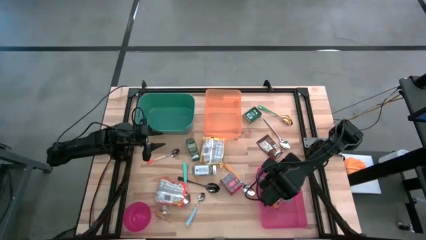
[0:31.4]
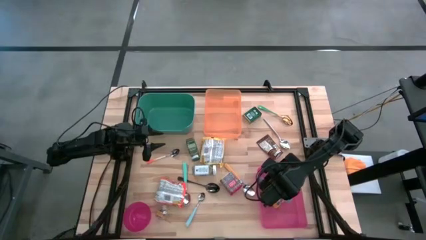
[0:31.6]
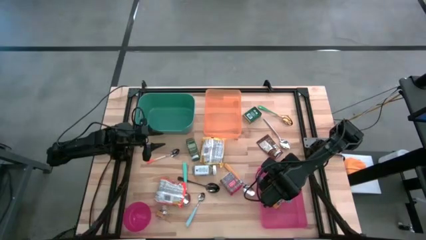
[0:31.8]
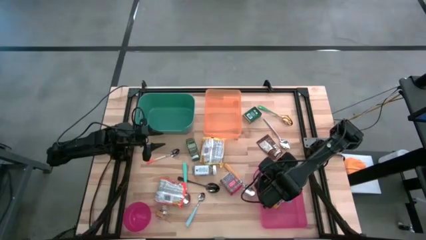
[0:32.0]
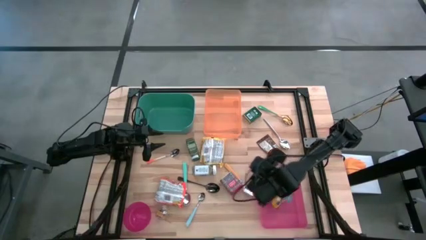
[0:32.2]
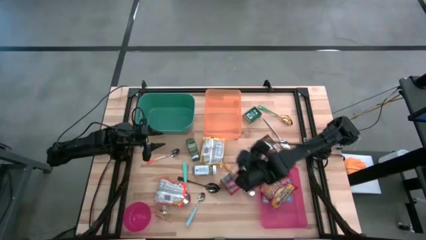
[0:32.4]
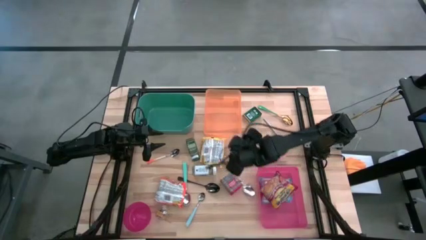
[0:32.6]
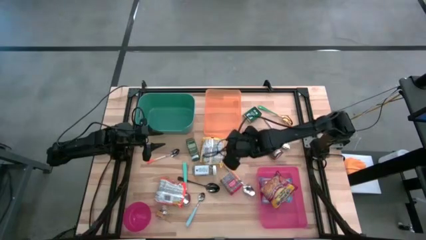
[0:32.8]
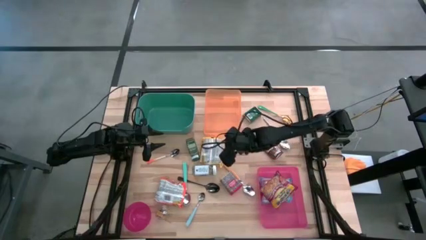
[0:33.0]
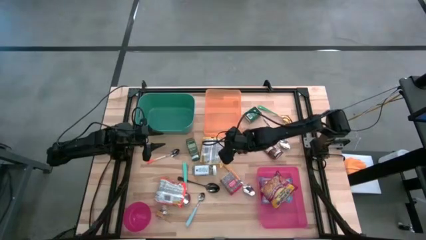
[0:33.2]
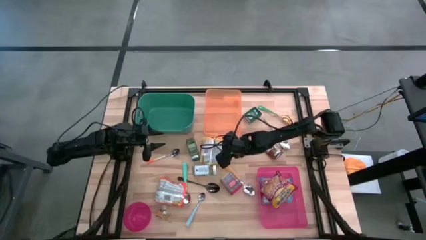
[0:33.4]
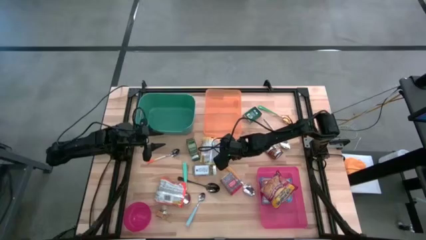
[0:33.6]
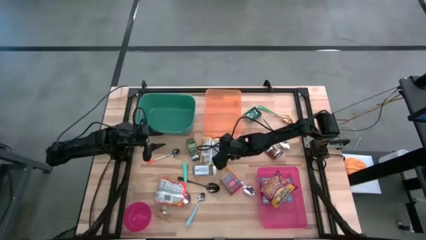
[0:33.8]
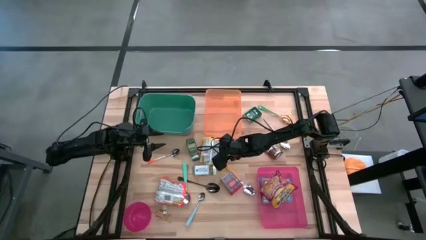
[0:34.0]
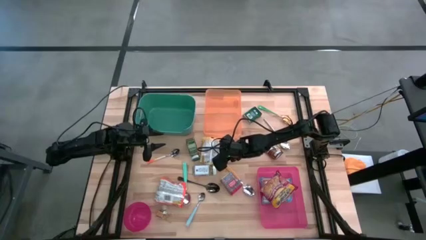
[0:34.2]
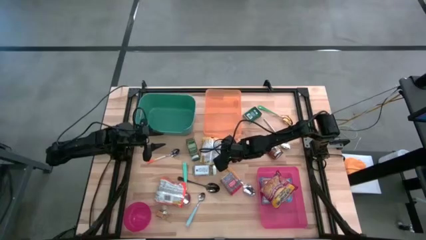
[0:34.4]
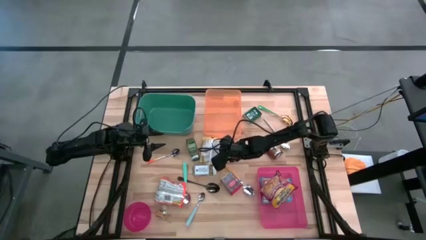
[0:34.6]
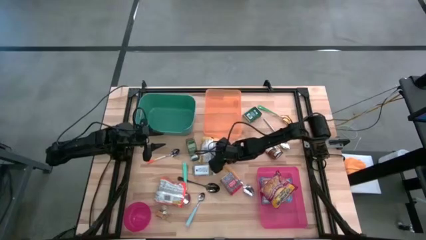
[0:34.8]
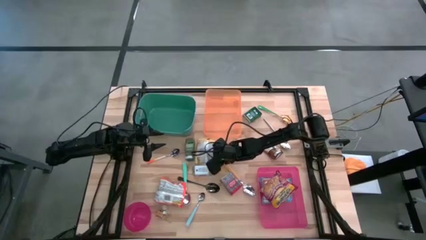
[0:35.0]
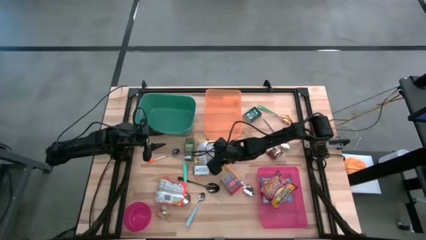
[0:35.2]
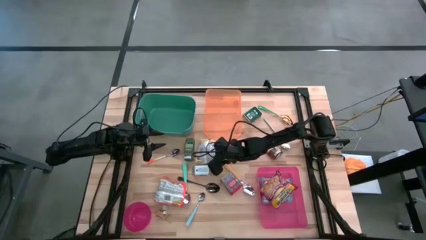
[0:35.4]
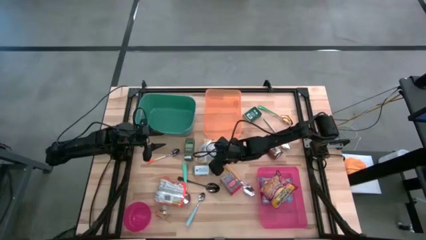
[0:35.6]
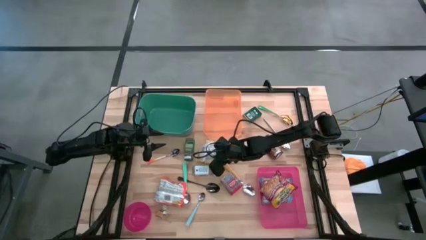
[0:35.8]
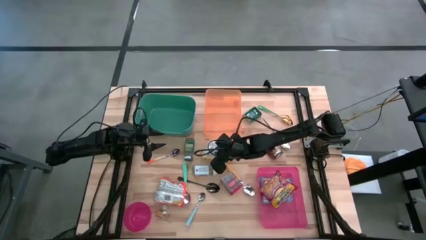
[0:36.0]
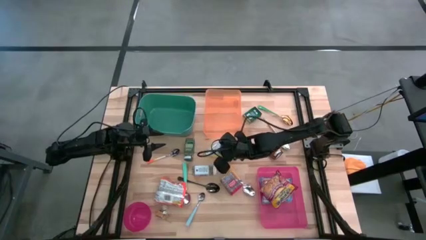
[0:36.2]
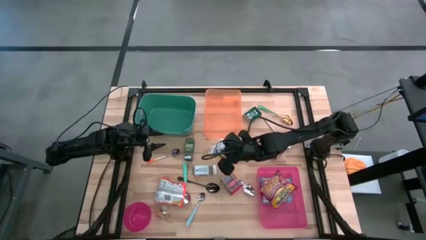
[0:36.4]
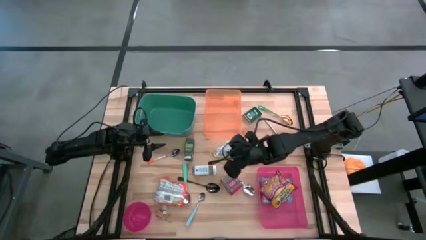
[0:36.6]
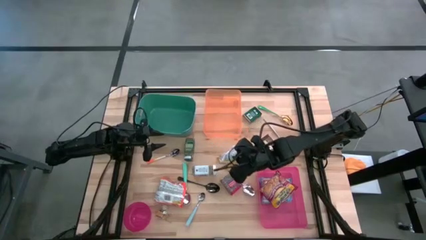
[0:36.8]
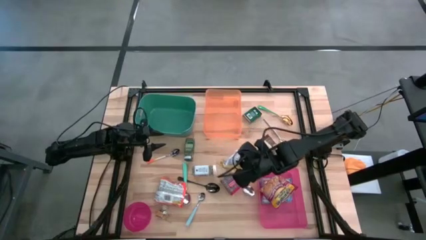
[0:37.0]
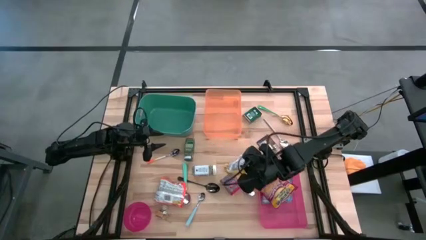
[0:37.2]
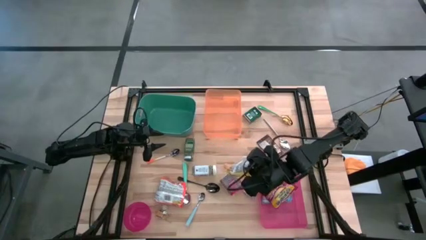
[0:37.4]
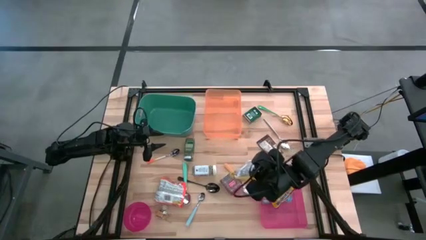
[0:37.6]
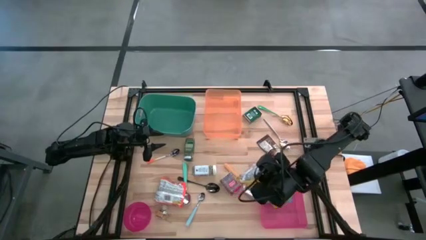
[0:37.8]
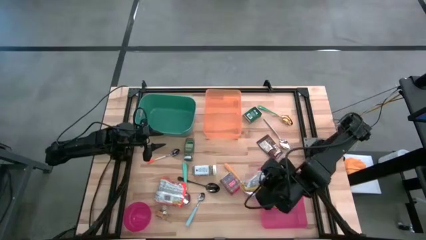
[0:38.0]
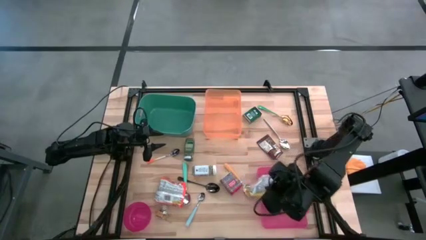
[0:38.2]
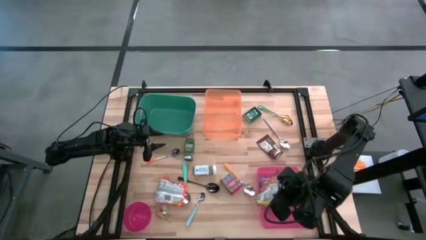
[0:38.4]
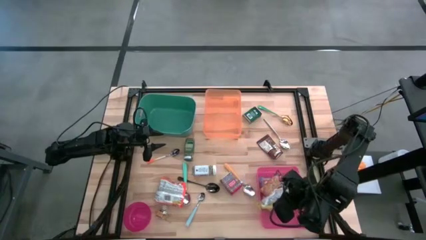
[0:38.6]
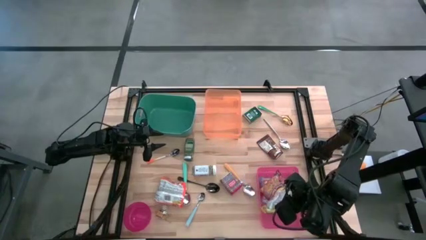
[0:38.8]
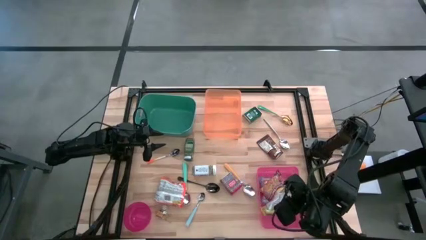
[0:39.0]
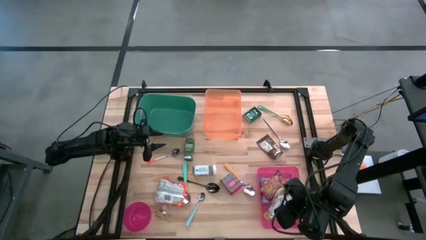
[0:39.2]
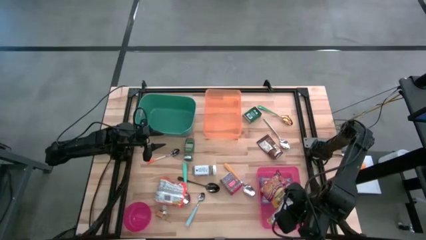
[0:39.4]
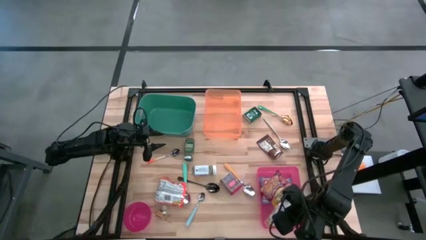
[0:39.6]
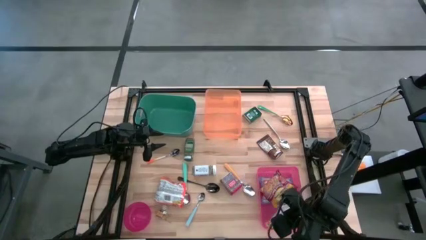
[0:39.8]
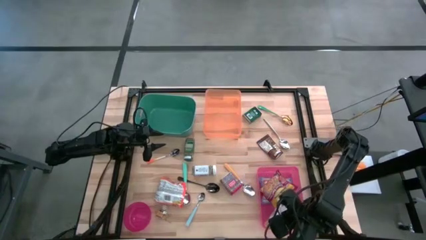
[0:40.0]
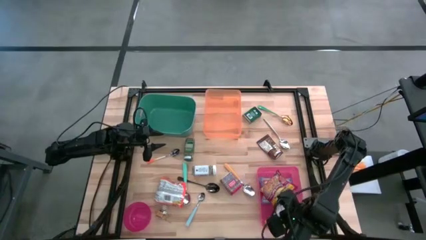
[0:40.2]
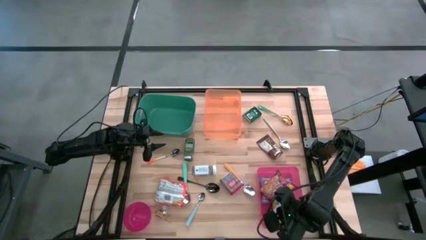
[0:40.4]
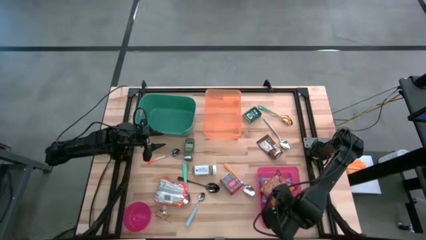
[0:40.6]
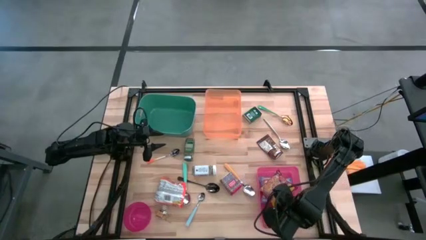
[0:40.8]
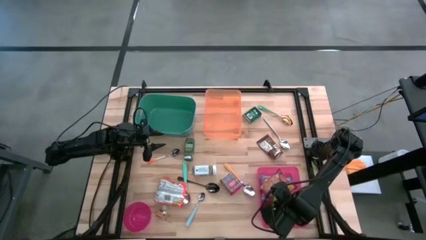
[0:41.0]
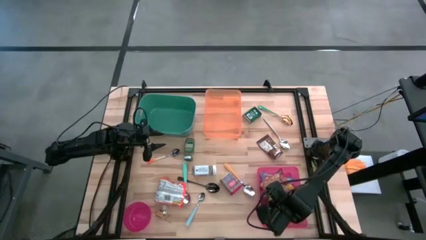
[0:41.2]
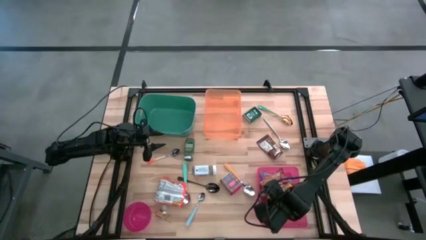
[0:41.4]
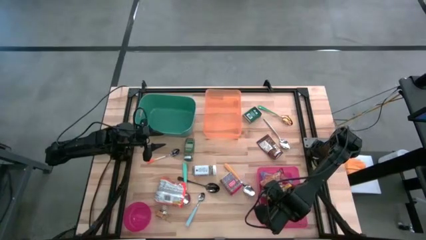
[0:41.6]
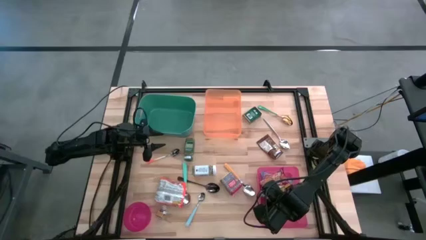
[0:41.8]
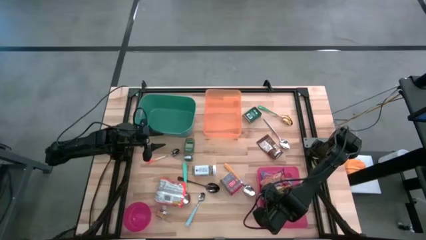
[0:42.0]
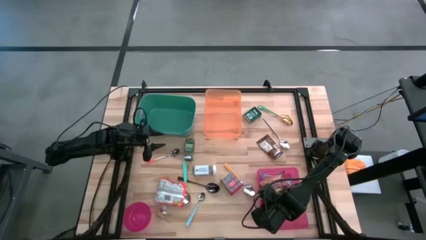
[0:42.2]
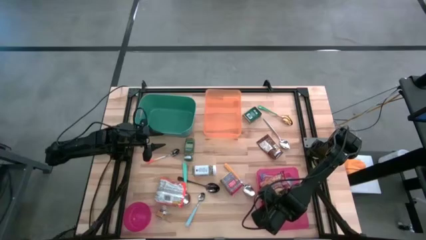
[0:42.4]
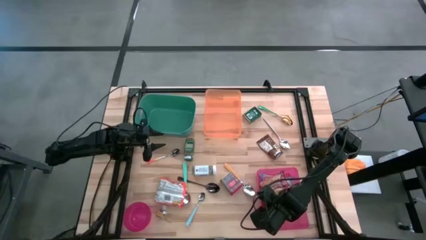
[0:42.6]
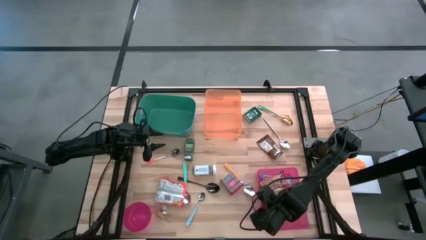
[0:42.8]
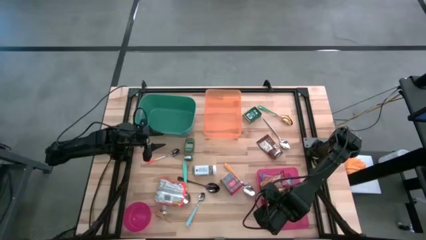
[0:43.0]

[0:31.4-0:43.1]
Put the yellow noodle pack into the pink bin

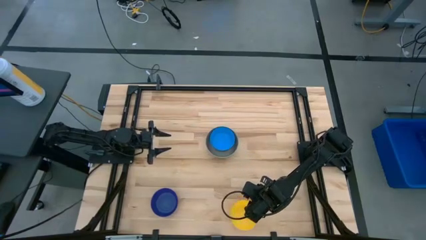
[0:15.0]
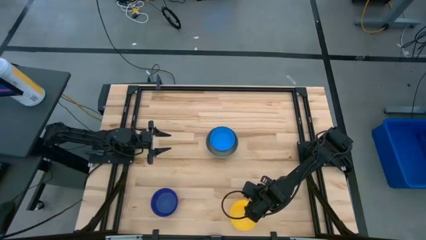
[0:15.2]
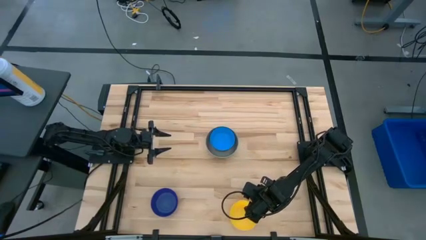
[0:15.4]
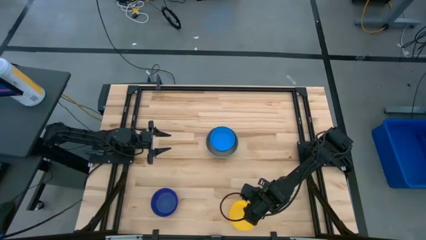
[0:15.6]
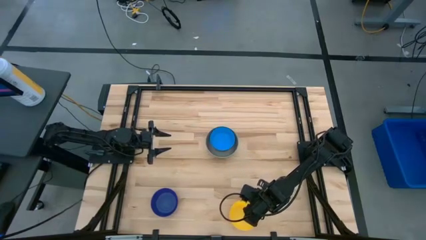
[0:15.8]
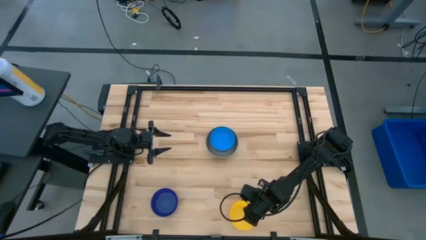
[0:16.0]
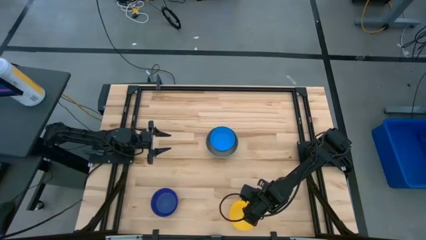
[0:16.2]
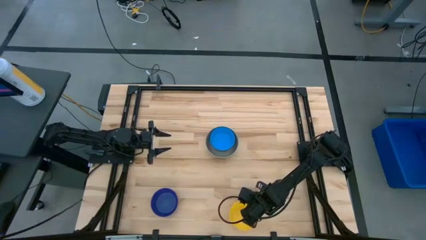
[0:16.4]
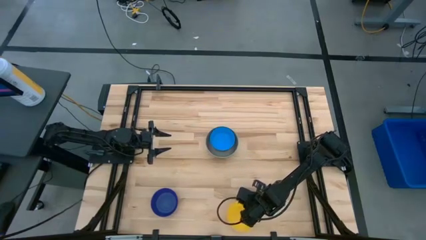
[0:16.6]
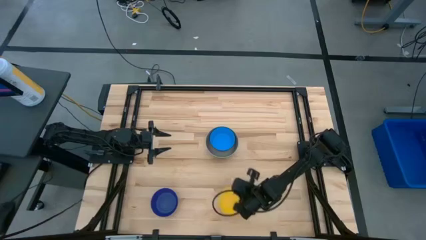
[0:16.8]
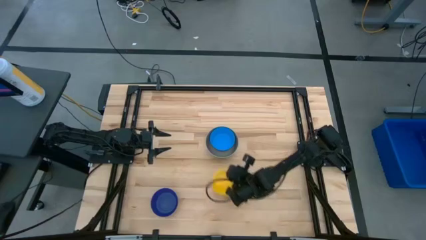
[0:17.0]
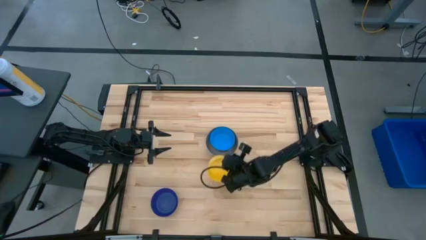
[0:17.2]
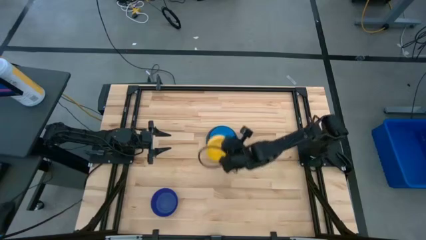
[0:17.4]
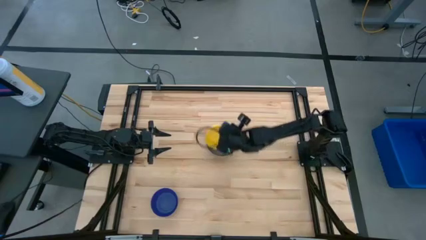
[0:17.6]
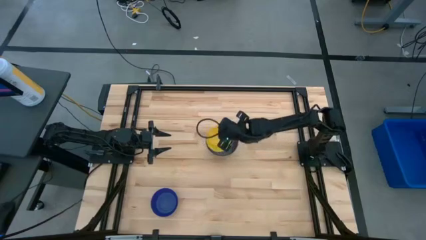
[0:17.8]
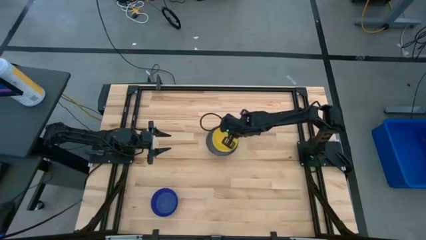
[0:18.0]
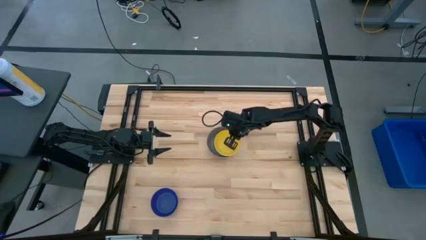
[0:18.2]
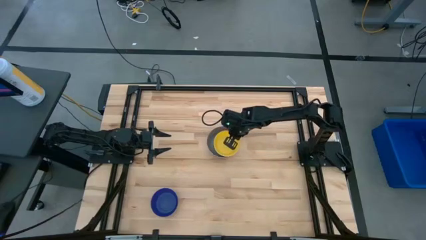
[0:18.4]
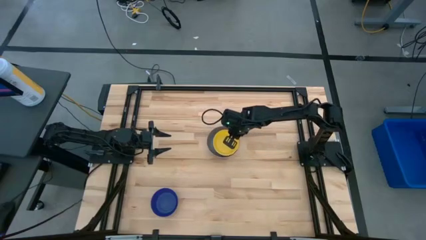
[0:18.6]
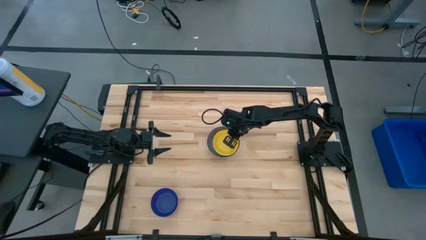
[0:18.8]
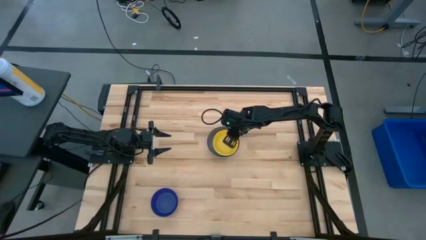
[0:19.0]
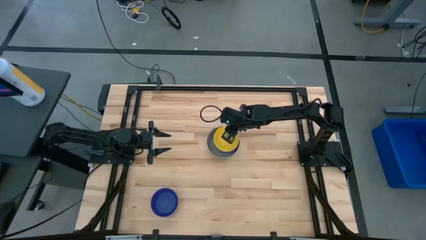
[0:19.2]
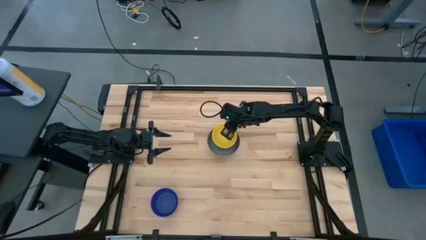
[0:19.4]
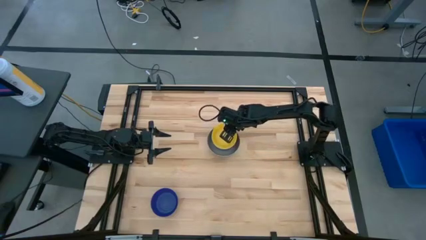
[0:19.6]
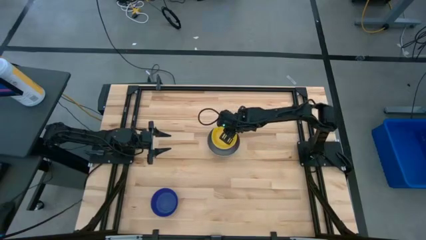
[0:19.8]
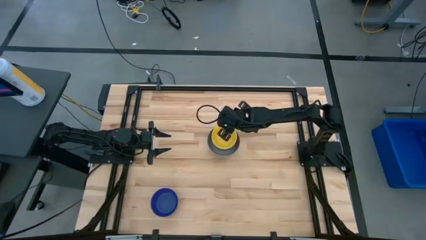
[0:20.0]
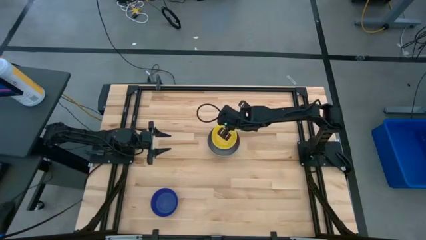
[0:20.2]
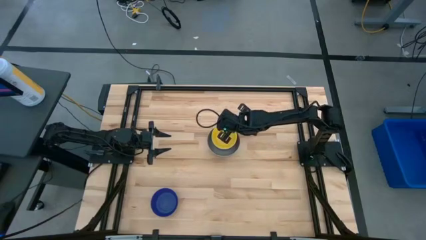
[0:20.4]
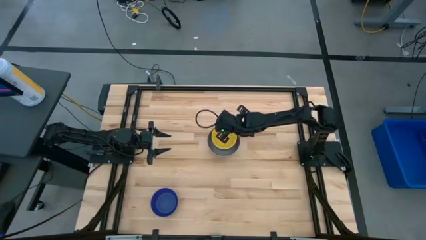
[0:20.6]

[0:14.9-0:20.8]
Stack the yellow bowl on top of the blue bowl
